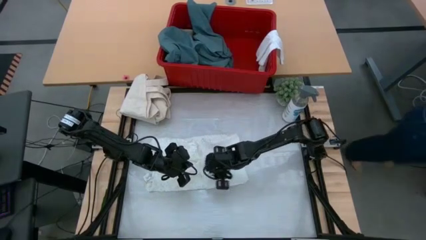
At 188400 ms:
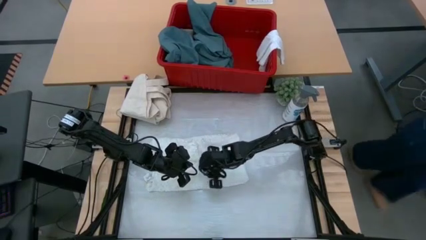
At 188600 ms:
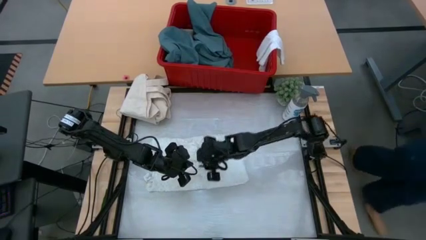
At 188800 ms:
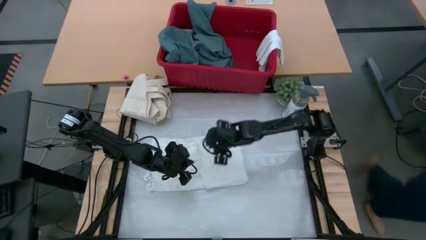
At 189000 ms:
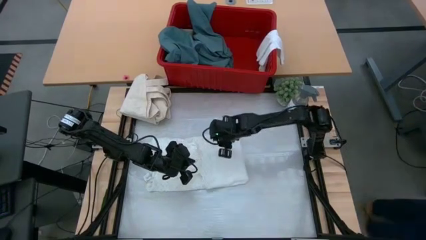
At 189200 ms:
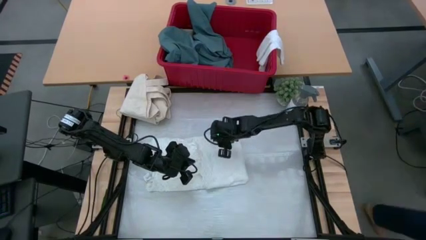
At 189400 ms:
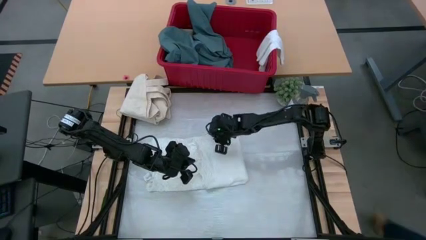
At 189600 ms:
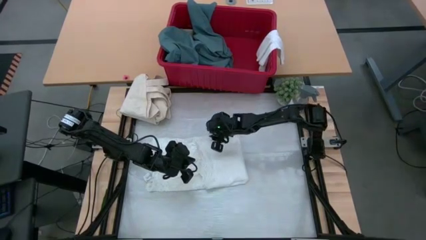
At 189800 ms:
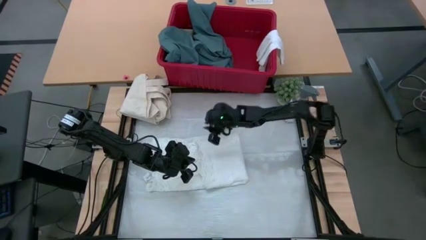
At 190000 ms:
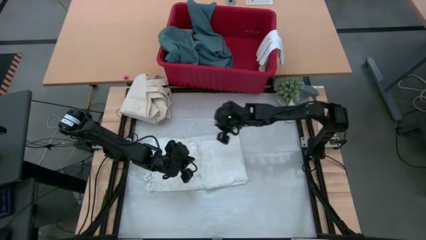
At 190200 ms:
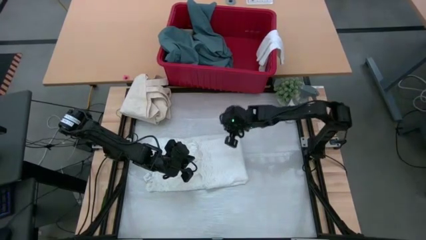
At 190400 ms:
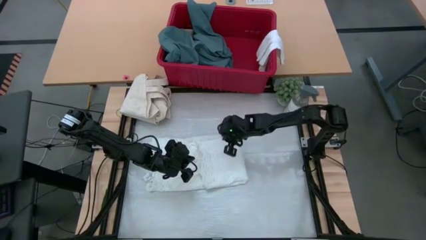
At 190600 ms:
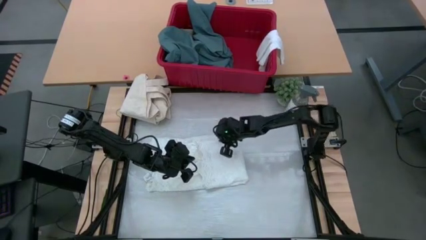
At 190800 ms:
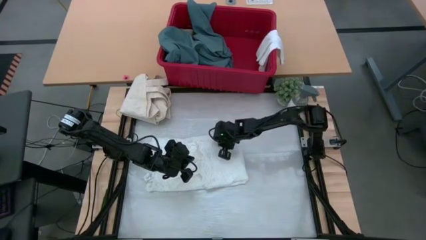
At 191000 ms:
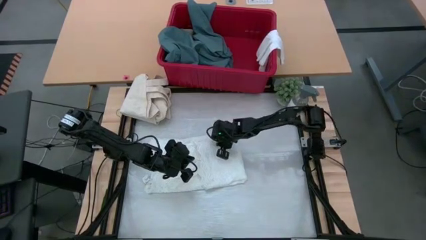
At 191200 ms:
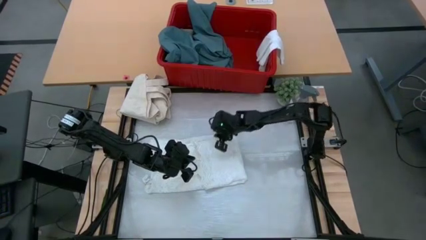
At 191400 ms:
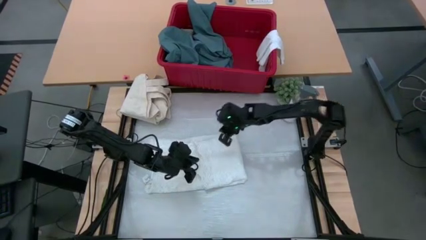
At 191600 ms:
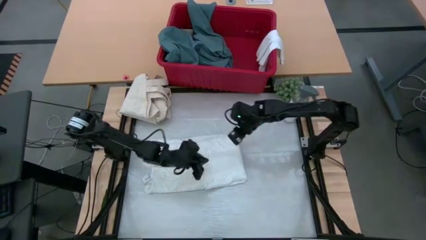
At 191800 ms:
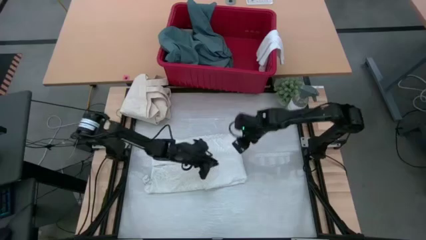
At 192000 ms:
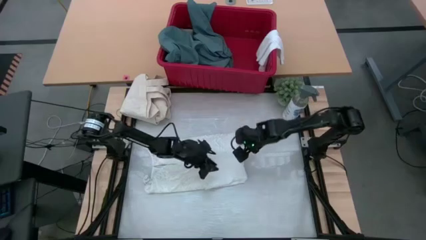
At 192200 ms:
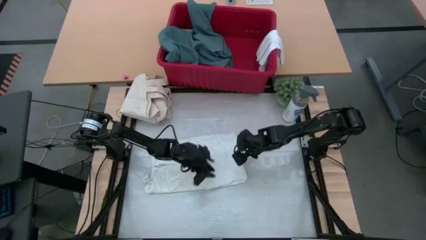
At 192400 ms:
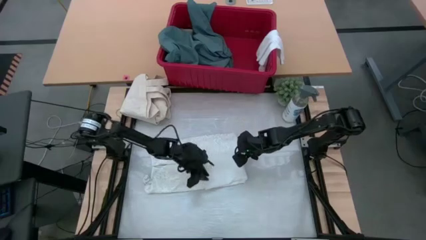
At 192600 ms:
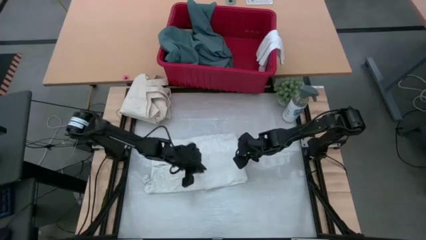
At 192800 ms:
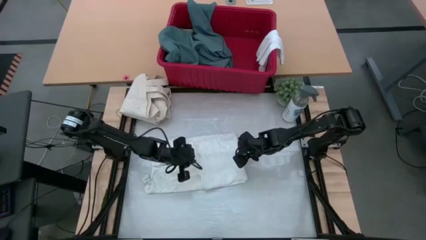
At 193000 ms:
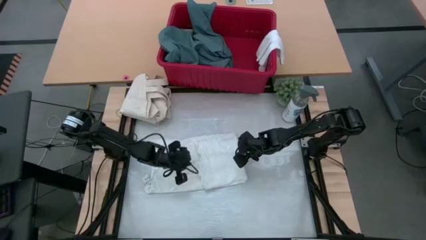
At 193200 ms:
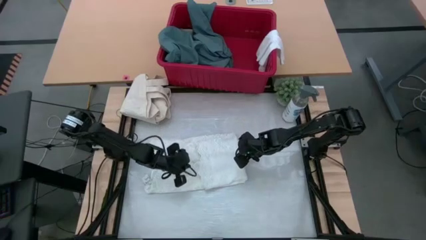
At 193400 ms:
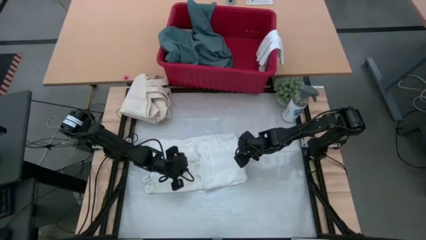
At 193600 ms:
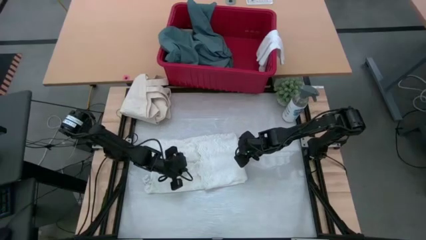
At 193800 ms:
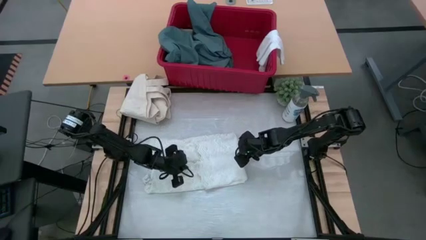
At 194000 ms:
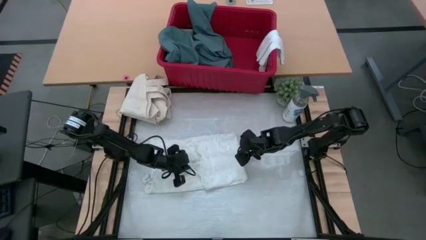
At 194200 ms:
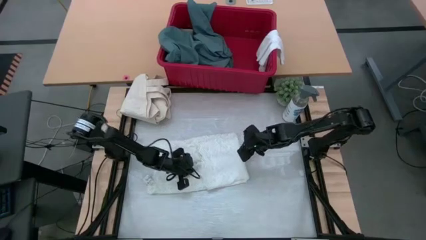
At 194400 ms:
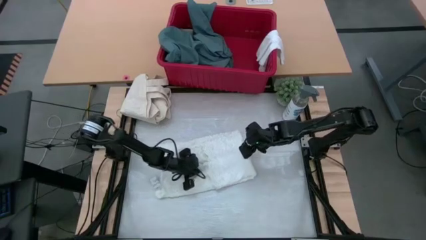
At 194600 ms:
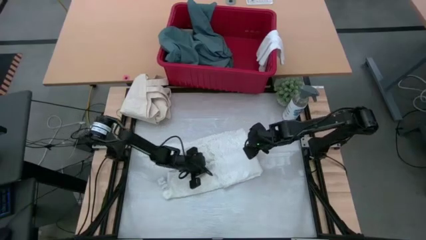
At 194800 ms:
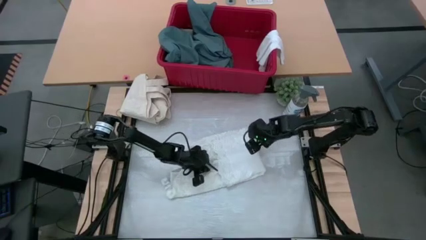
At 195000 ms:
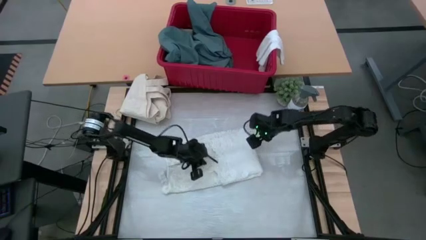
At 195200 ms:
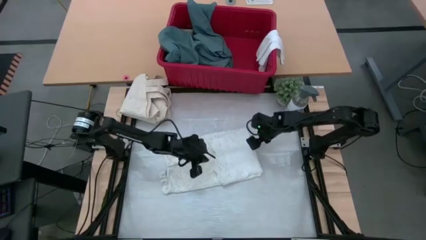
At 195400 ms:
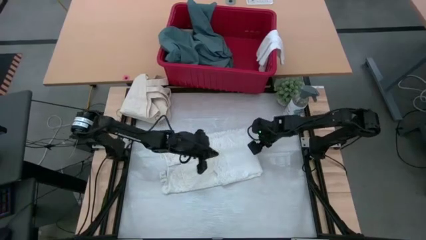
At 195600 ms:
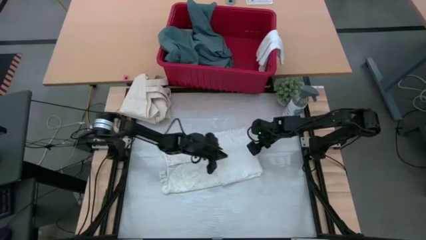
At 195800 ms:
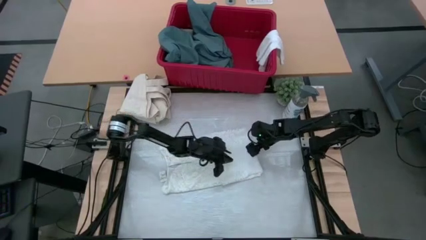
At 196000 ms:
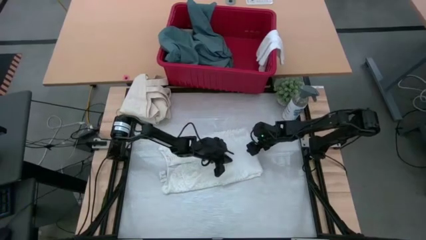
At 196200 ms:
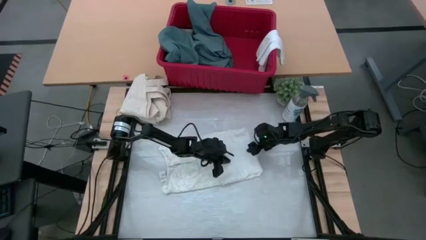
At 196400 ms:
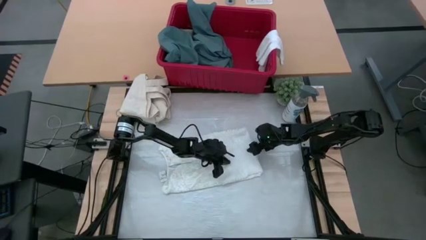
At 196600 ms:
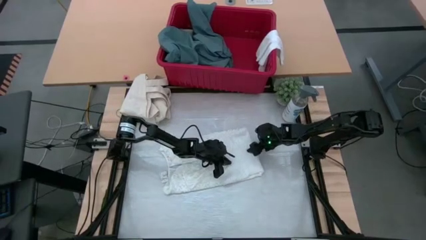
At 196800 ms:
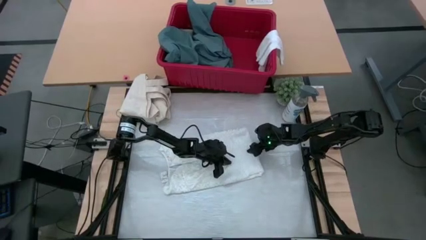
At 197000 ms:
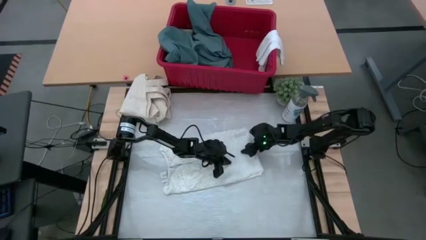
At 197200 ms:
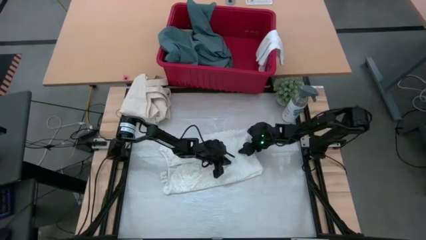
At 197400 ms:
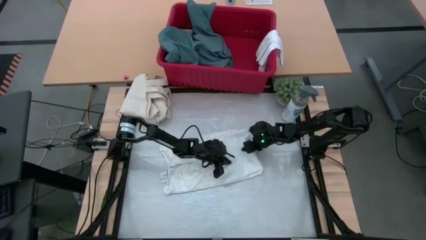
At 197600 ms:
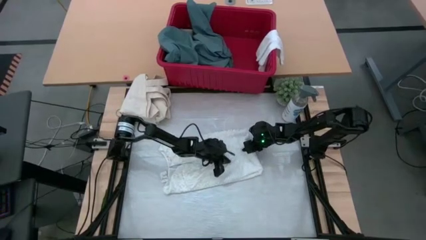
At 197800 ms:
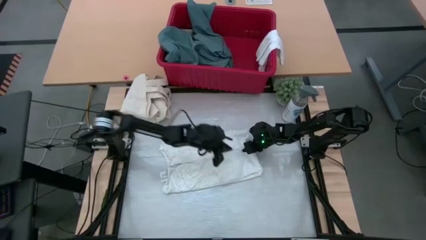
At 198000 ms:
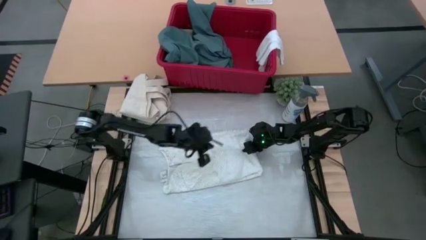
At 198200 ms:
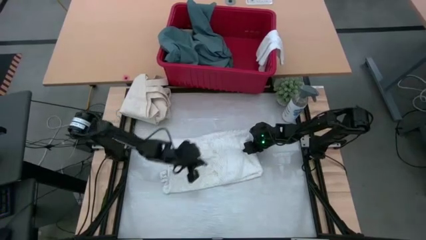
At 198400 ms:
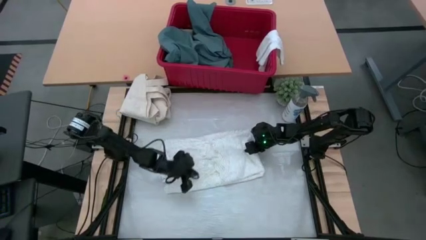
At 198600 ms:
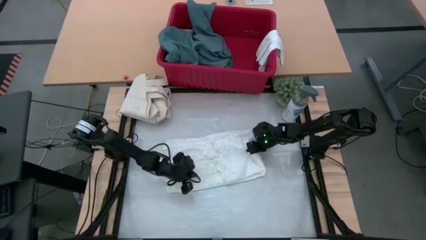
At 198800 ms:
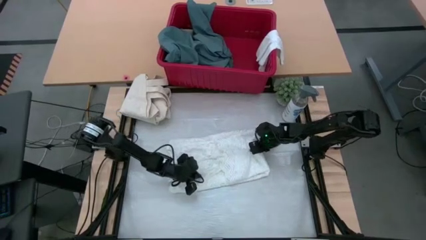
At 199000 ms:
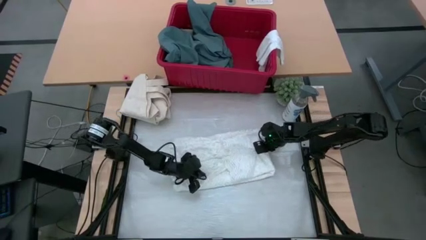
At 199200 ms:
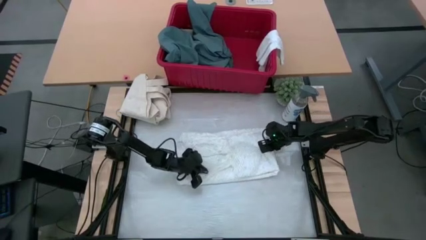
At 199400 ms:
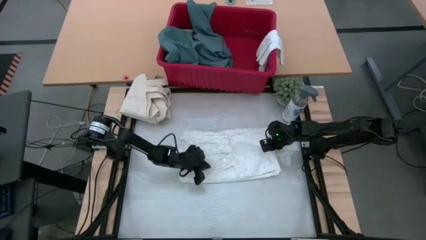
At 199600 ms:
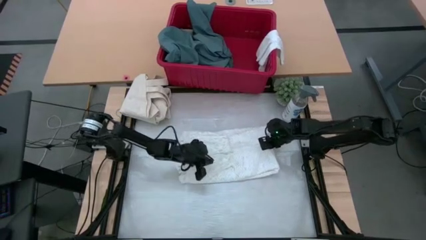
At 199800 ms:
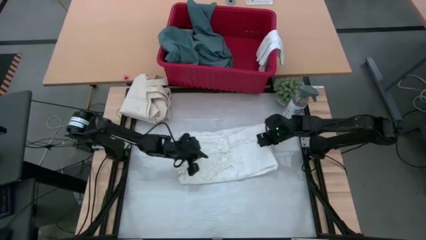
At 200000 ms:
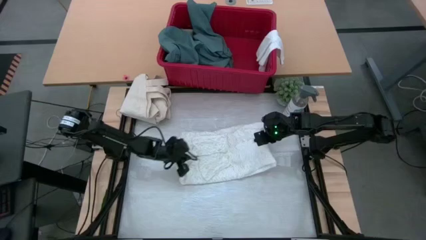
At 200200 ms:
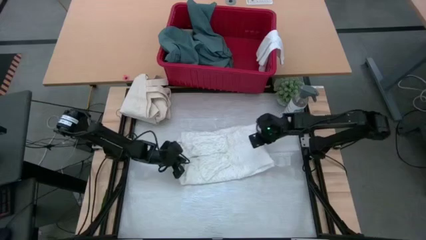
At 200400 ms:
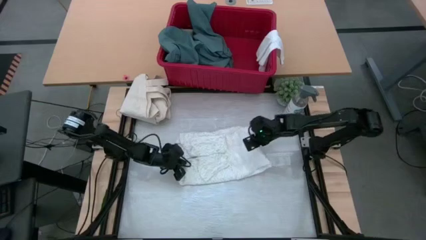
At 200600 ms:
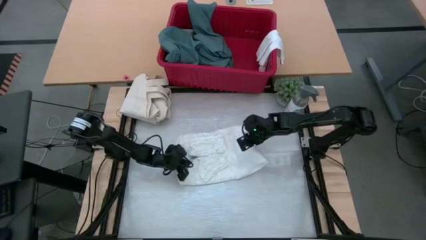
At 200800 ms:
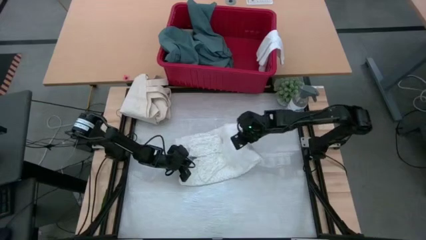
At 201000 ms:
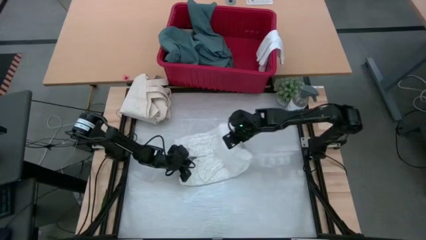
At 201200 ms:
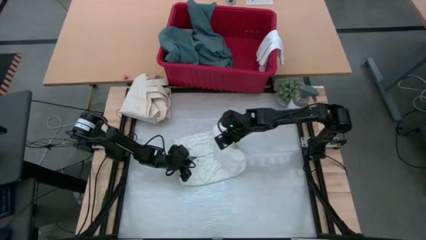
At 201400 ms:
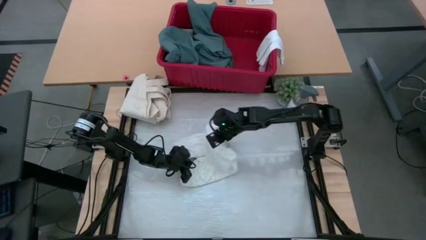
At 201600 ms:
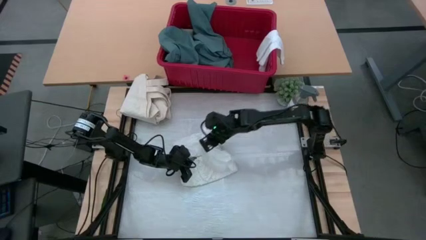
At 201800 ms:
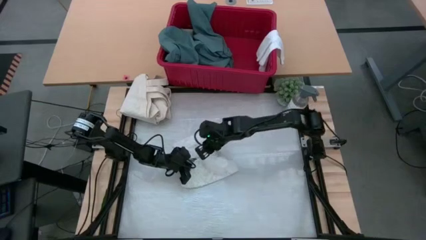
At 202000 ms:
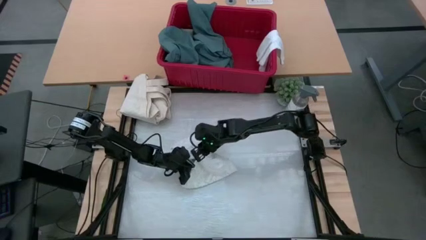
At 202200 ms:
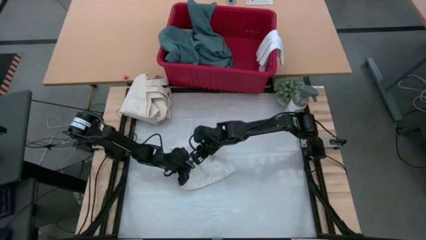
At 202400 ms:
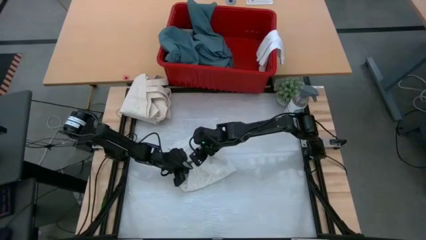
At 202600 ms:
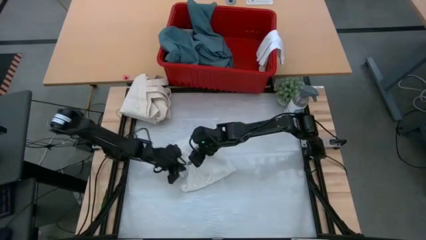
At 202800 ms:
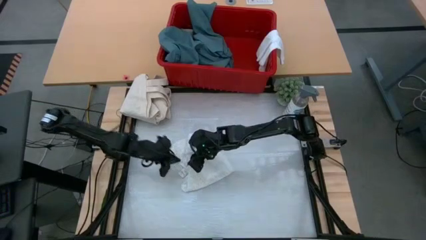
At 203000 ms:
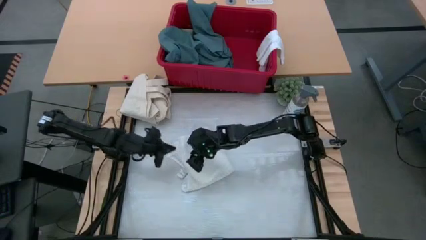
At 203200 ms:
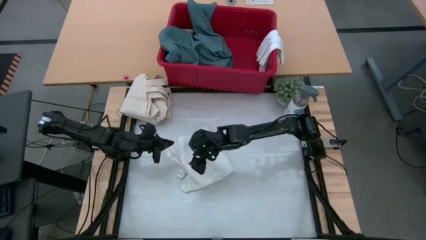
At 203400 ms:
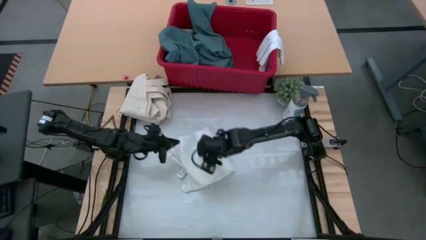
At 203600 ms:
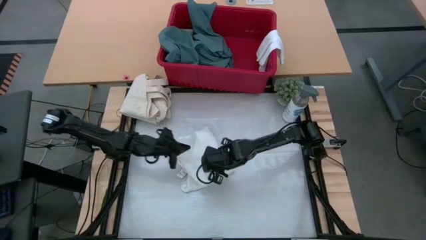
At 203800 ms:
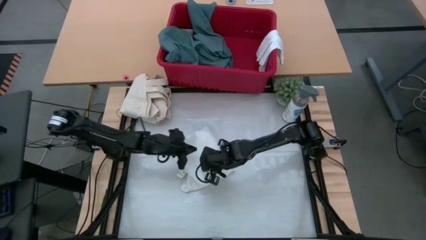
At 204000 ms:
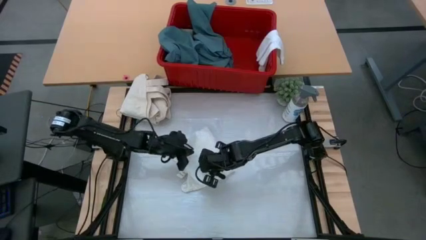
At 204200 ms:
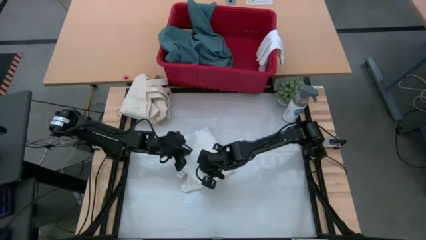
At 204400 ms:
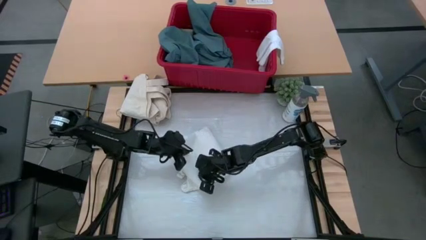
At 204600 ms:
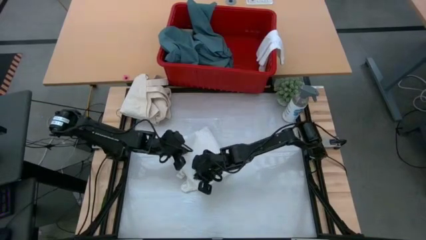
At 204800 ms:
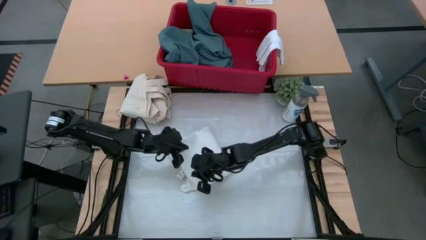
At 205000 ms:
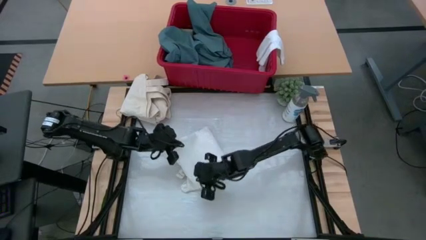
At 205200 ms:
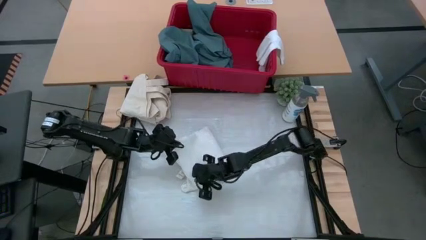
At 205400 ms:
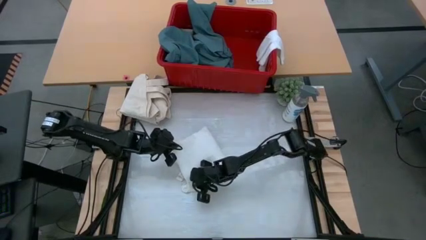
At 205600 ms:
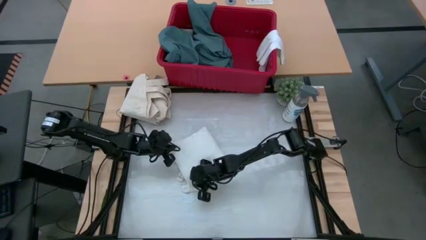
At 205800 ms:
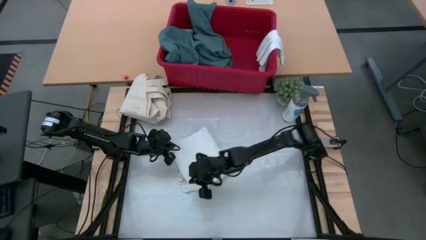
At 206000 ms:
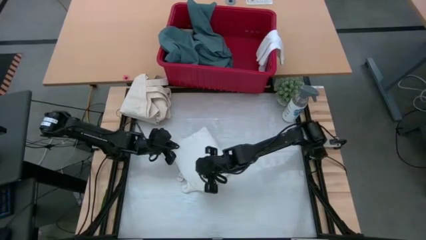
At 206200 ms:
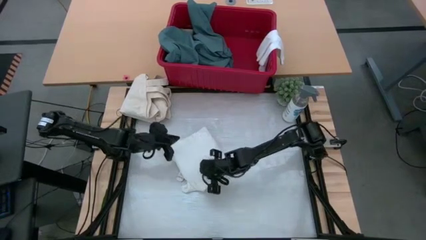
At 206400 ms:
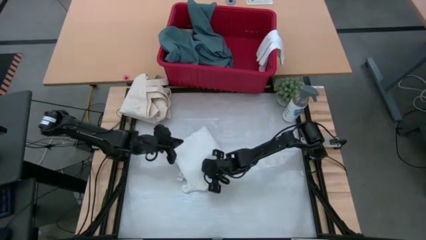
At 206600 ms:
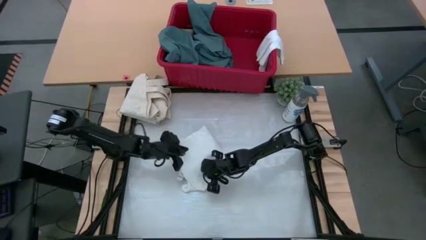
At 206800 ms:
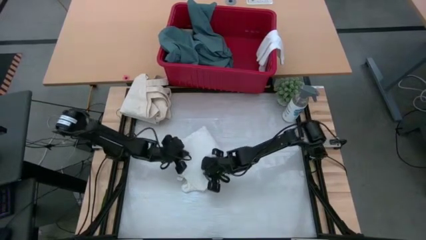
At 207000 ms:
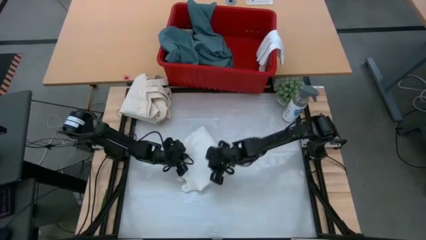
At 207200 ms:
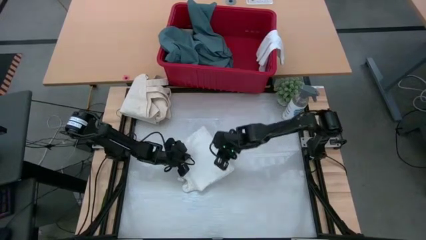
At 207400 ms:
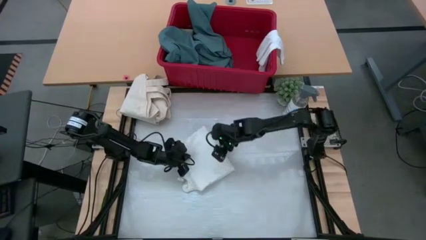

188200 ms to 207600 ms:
Task: Fold Laundry from Bin
Fold the white shirt
